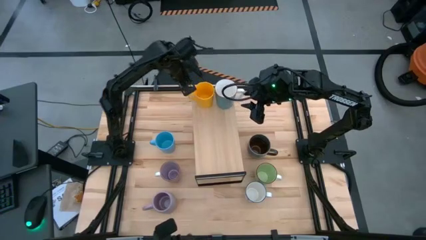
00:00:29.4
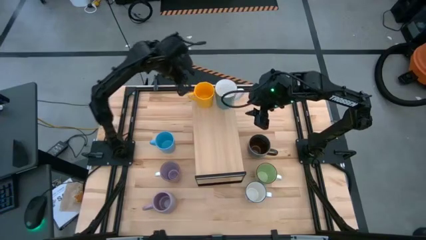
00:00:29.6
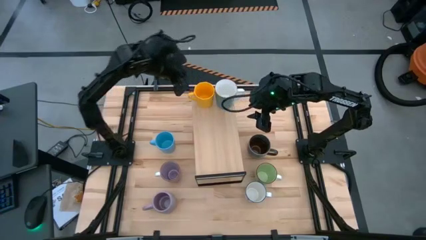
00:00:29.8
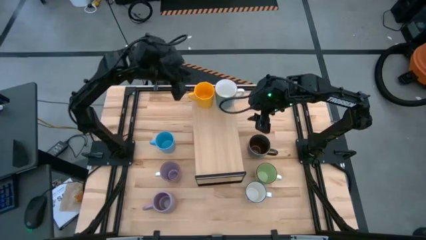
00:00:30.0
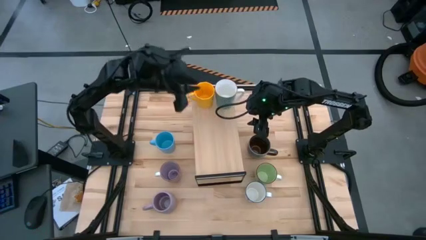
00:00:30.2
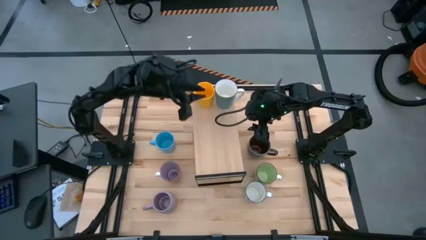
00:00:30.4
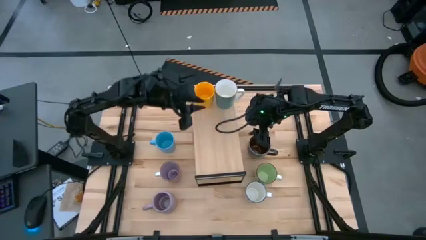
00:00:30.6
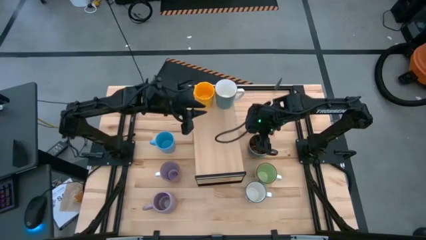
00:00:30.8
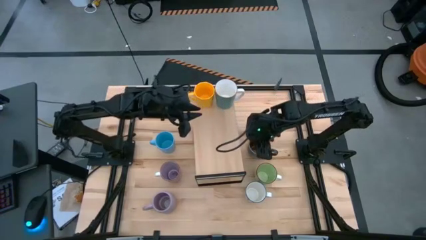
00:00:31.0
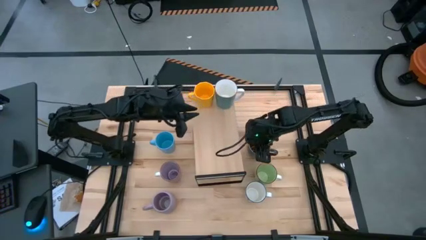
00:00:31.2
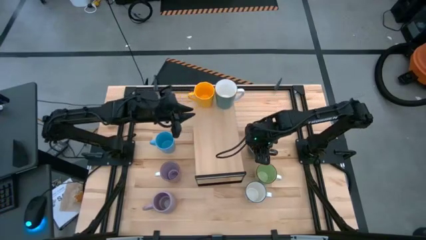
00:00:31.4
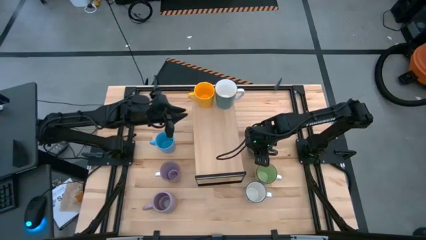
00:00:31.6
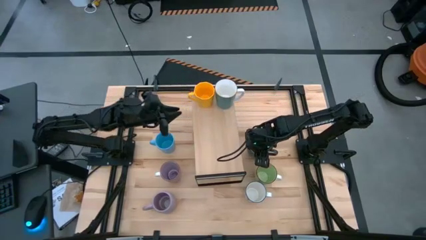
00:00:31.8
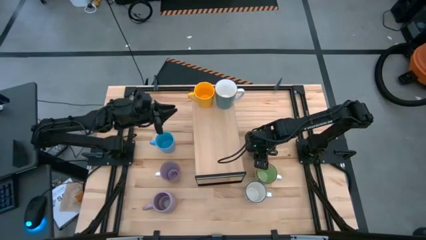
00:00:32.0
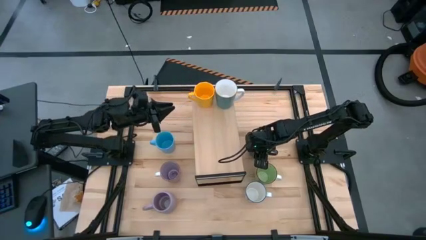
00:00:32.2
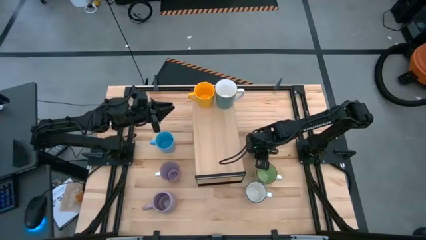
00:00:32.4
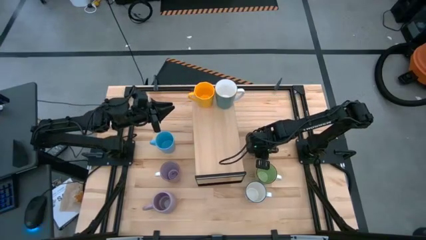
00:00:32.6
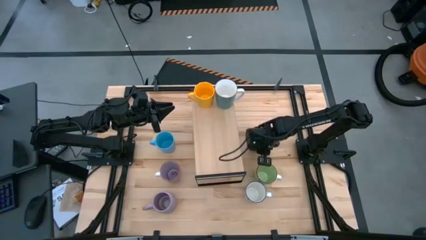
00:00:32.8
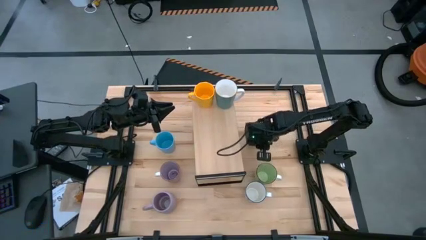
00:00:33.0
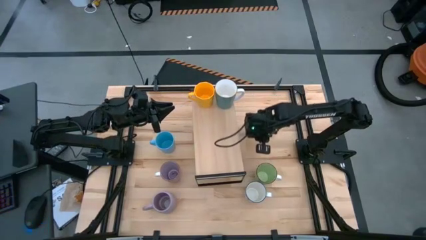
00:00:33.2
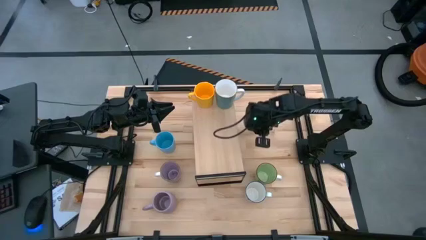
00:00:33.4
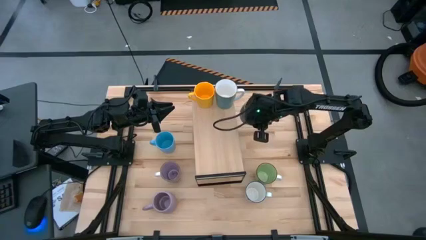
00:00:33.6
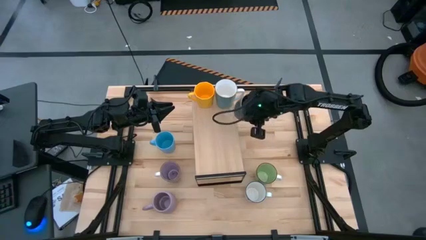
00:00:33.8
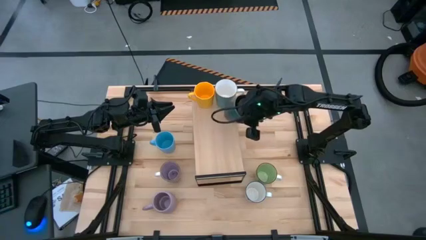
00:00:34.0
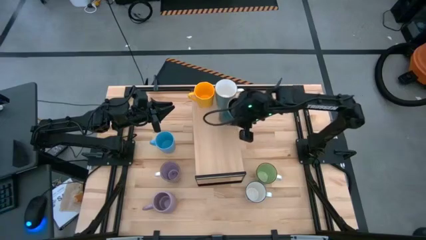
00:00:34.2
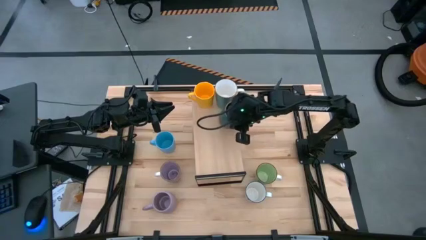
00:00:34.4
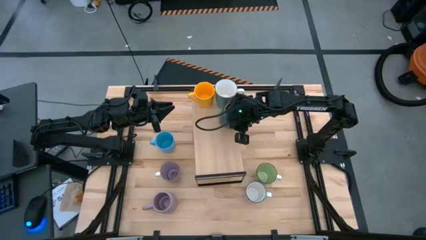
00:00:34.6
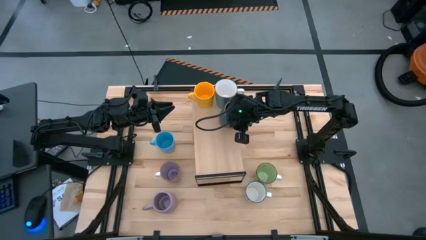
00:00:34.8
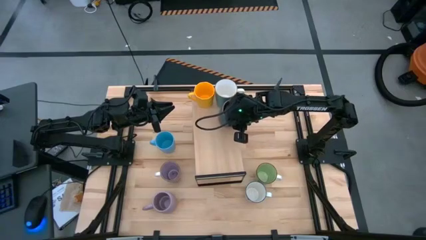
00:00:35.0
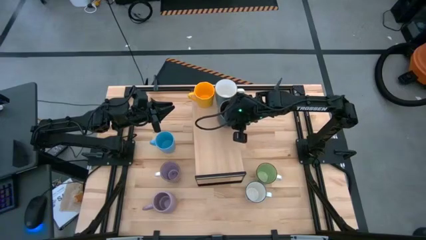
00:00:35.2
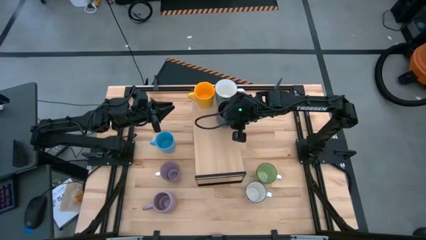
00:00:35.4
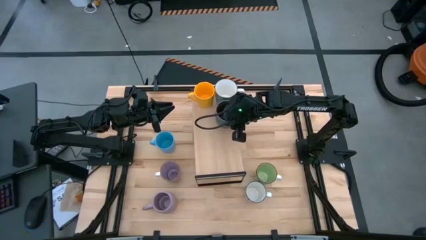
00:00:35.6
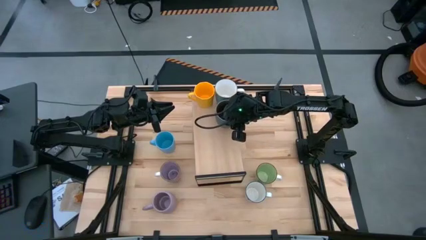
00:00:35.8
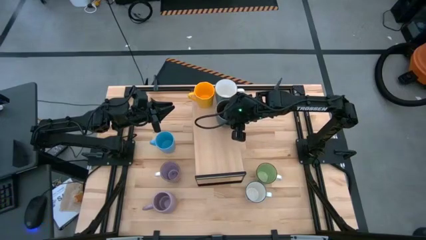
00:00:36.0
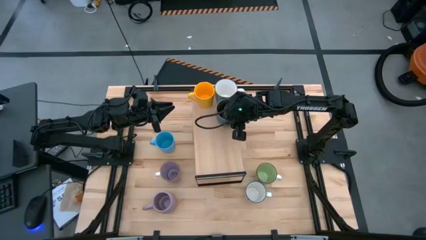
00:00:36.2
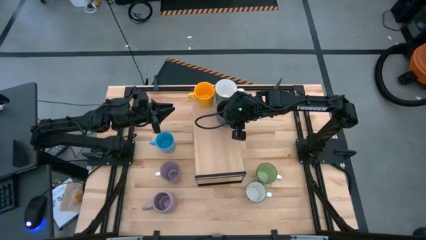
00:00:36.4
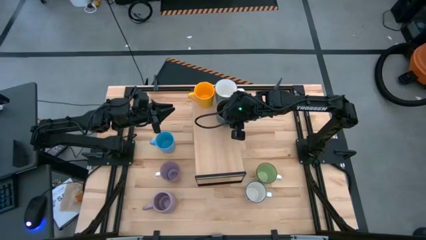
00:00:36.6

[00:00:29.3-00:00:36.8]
Task: Place coffee mugs
Put the blue brown mug on the shelf

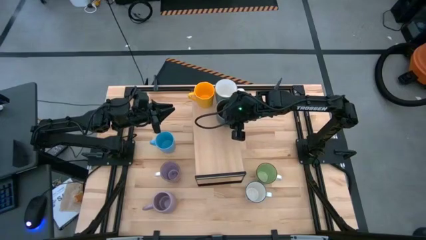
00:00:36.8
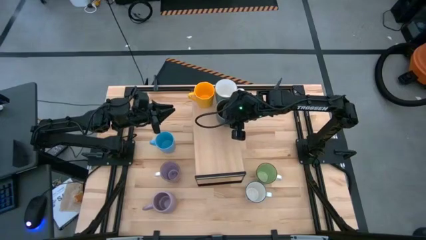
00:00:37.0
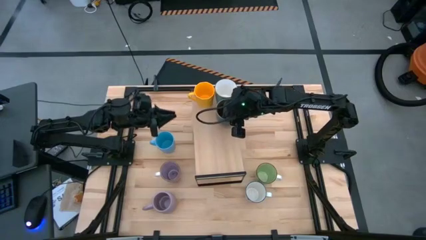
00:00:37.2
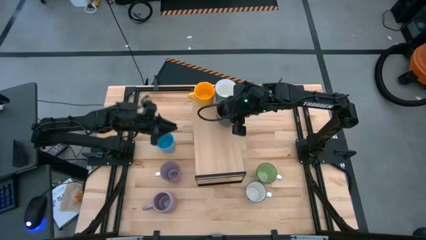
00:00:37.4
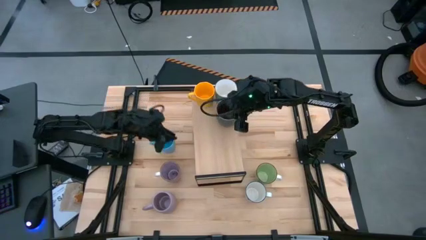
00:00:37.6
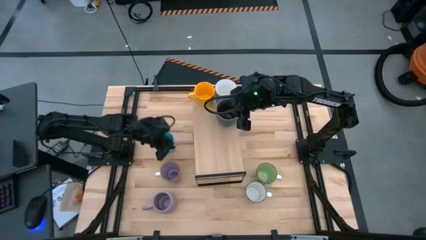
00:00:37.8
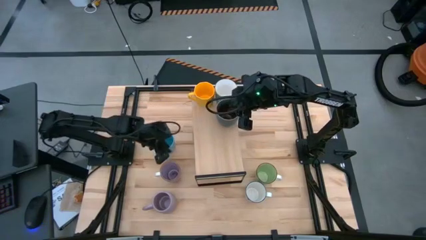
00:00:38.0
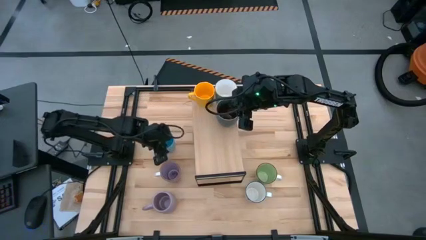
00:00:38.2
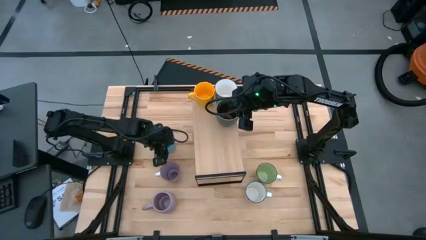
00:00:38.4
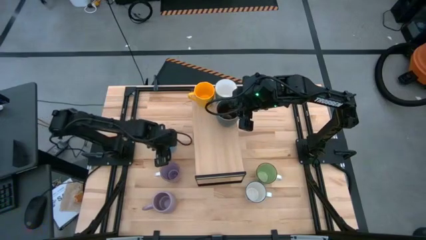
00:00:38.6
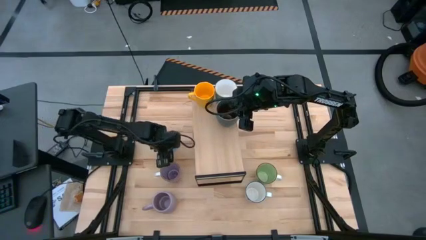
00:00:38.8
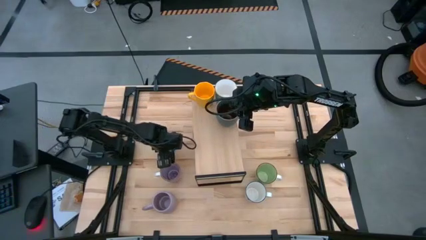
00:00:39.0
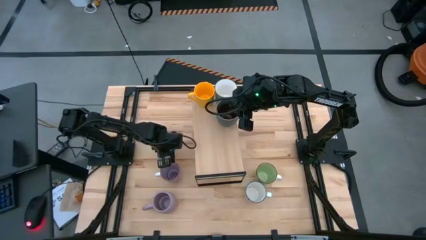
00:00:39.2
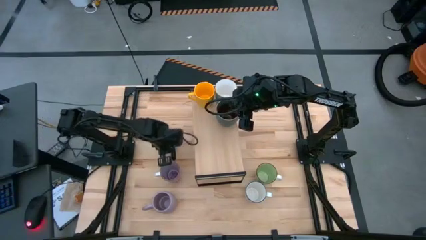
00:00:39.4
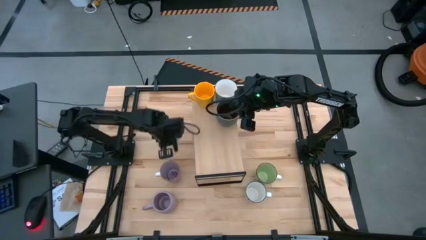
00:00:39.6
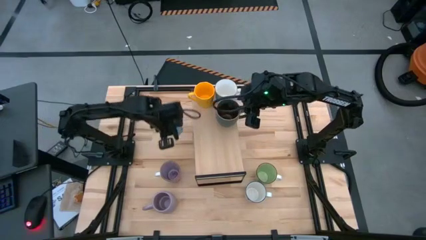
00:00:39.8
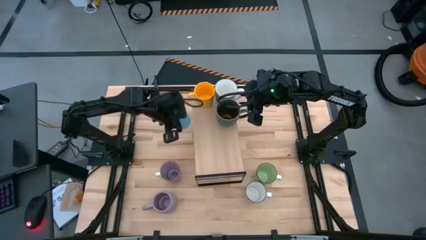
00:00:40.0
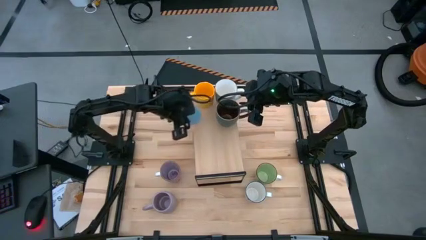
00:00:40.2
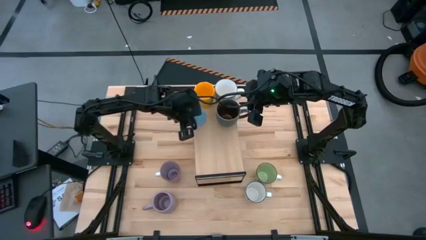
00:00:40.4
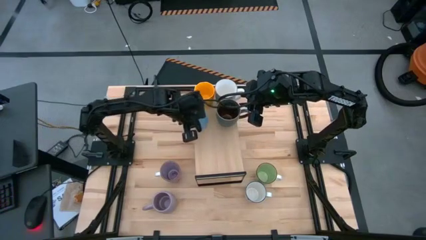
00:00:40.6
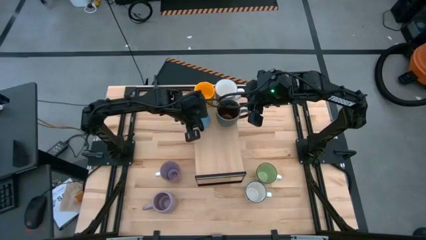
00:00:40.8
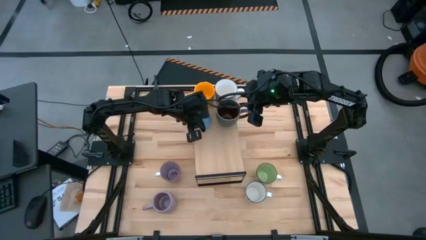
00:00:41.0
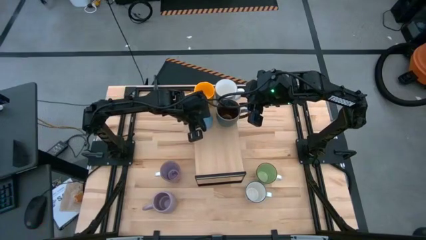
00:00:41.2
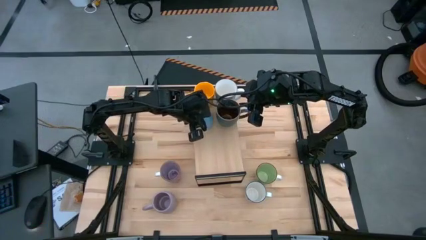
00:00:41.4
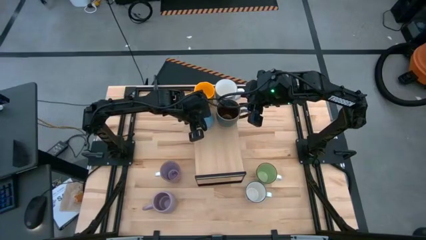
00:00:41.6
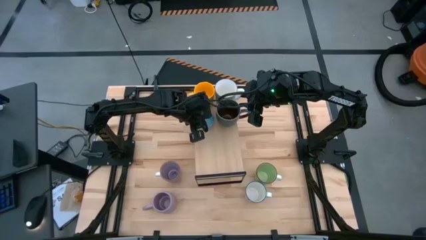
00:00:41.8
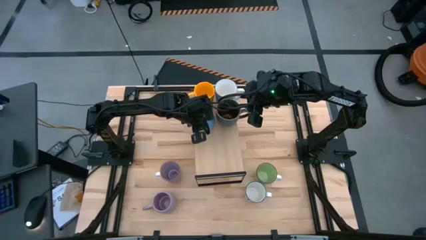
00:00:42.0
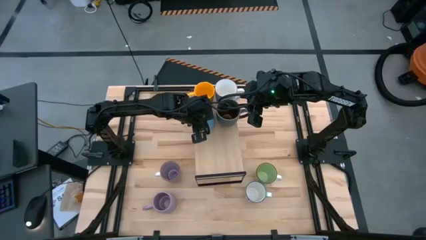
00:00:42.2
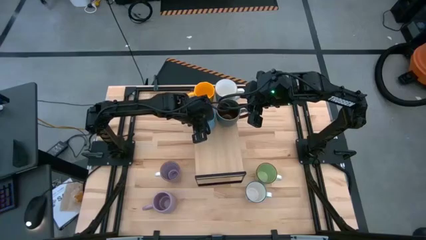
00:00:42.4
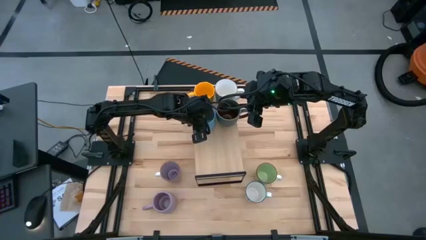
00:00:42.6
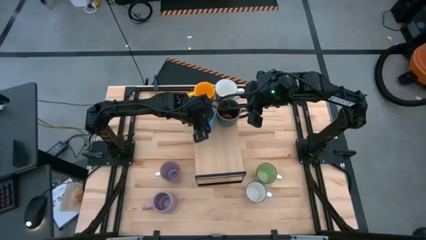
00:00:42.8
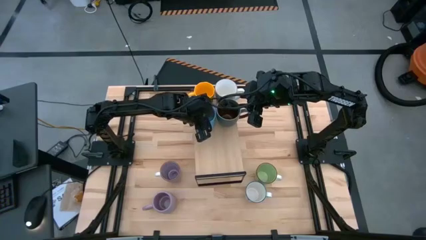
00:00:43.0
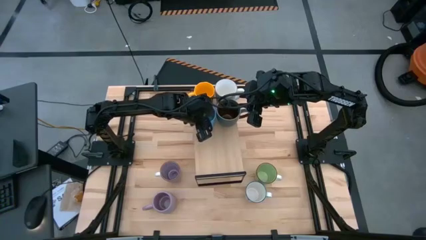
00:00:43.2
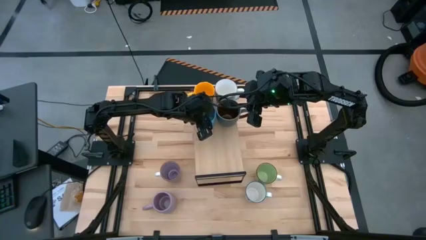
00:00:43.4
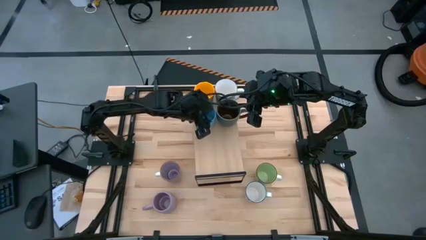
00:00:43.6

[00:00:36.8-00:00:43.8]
Put the blue mug on the shelf

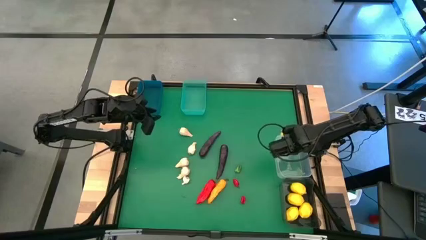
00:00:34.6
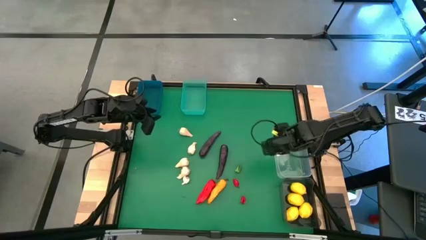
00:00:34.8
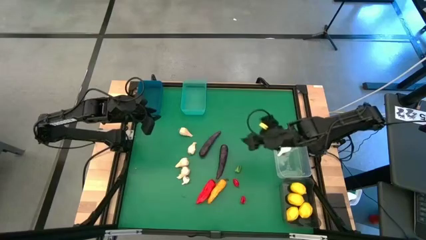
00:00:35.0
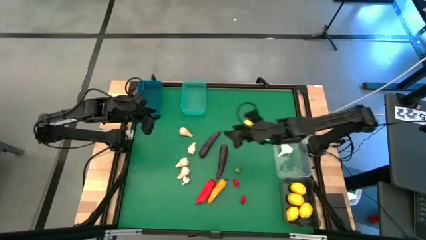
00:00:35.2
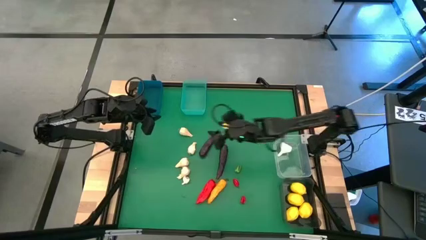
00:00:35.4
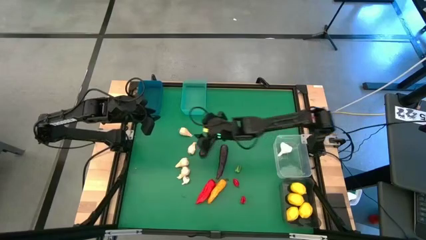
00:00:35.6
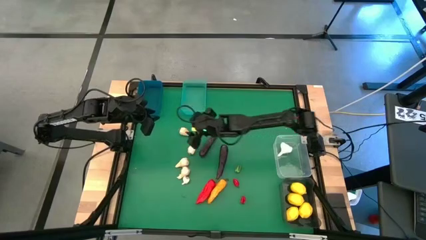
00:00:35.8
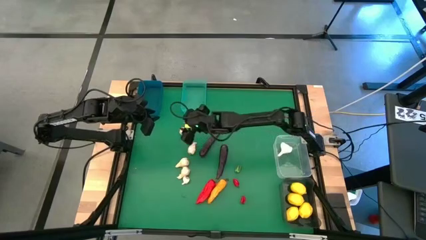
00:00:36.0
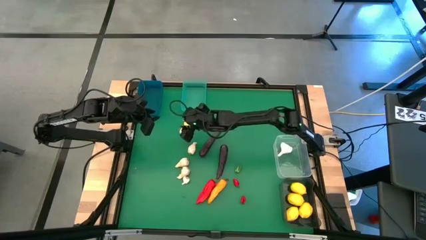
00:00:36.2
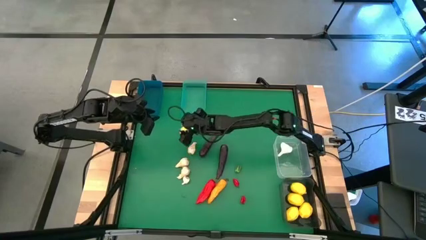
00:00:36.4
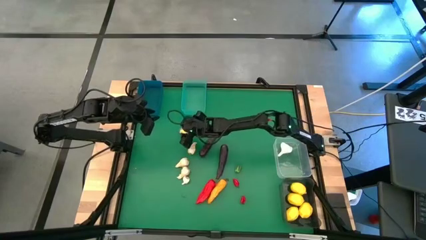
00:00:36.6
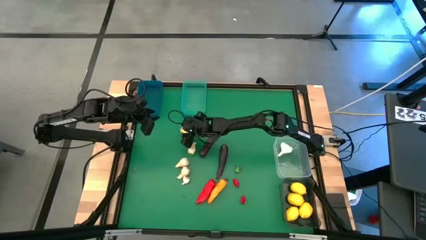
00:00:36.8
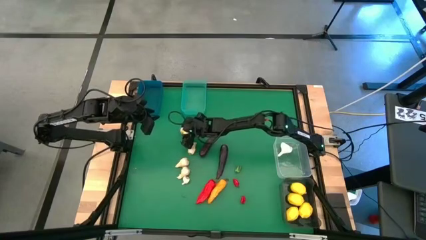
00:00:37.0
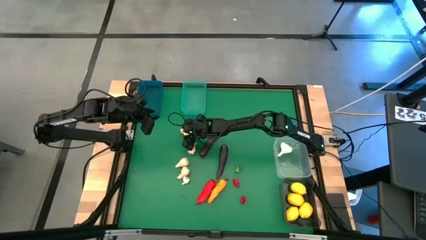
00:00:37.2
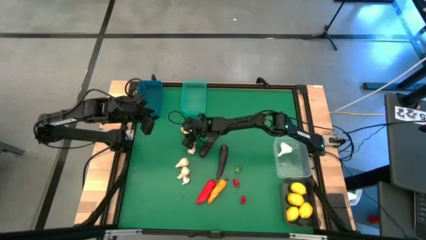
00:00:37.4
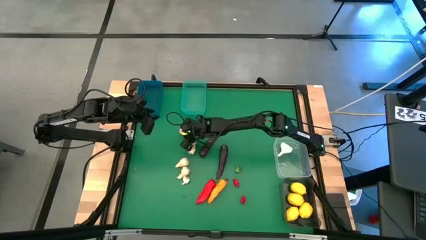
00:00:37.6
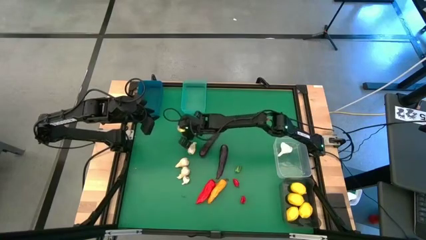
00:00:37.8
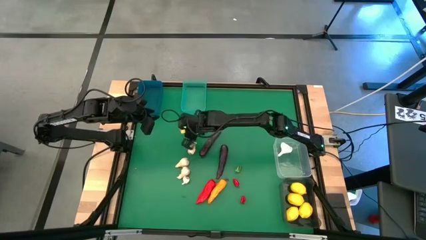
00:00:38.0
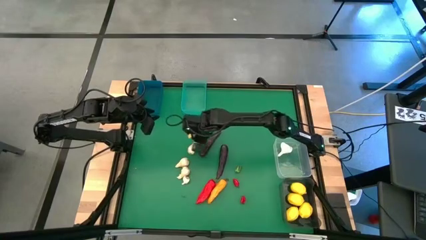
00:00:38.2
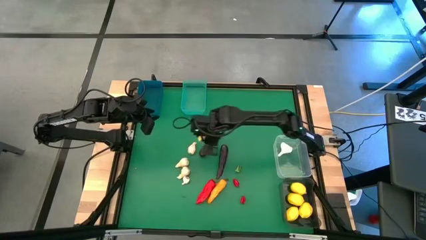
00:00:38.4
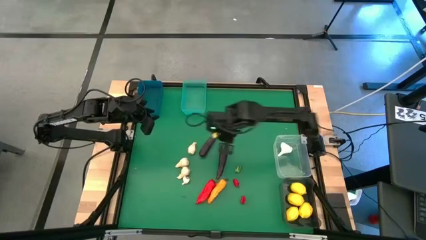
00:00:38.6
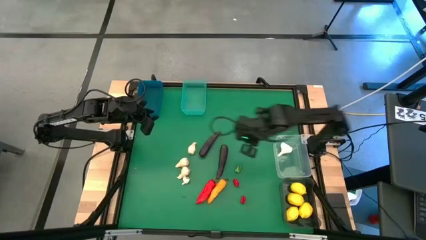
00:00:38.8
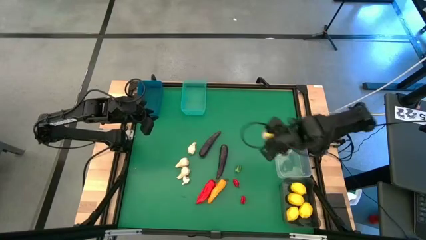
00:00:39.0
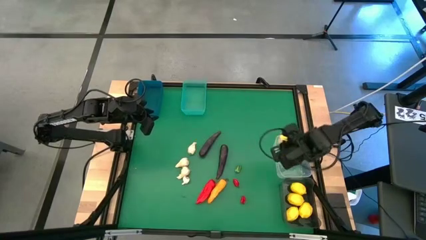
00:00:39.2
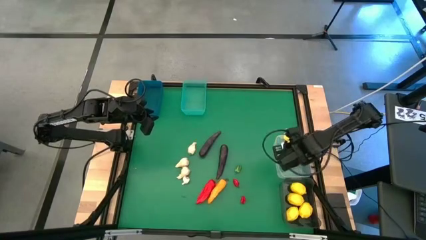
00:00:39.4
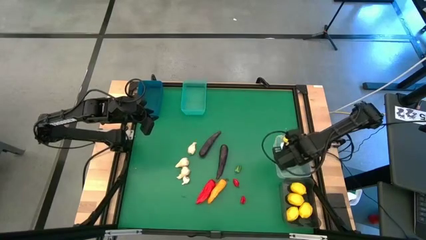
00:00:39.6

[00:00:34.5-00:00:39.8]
Task: Sort produce into baskets
Put the white garlic into the transparent bin
